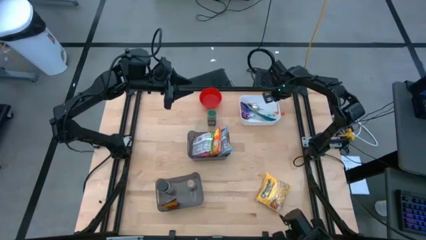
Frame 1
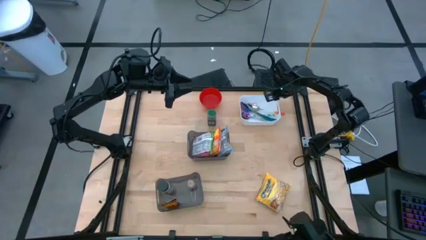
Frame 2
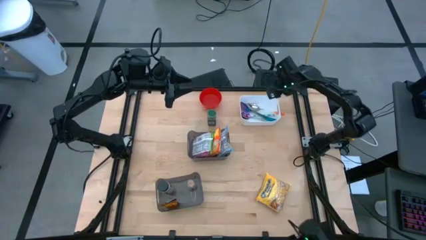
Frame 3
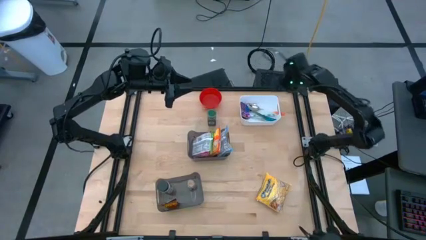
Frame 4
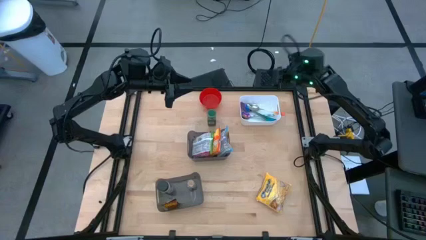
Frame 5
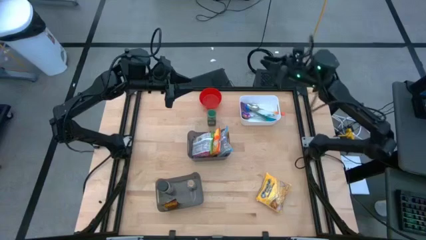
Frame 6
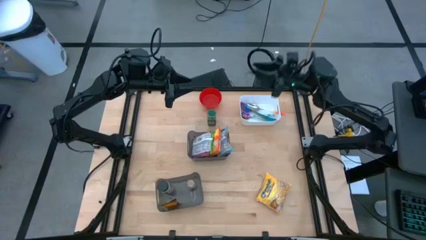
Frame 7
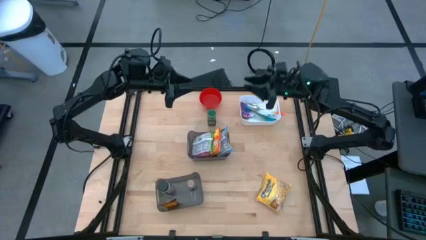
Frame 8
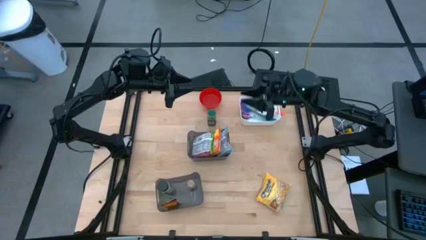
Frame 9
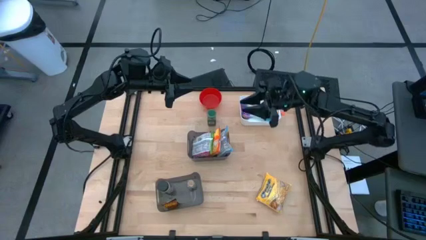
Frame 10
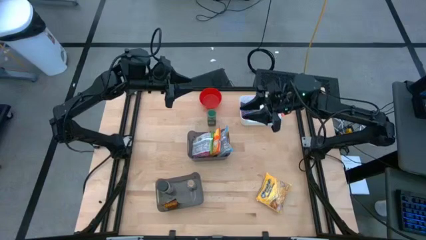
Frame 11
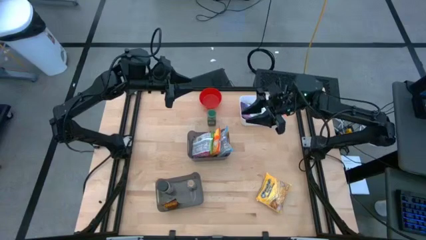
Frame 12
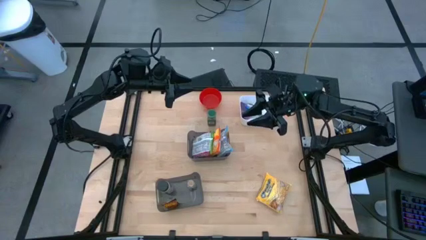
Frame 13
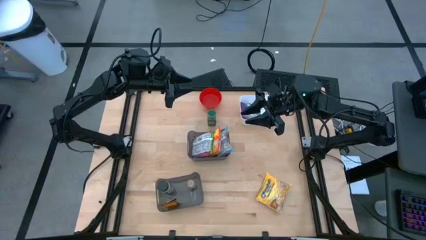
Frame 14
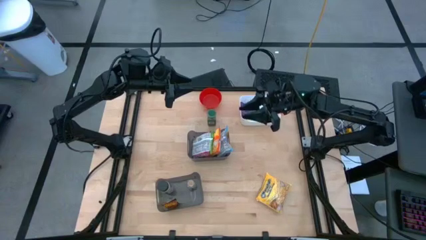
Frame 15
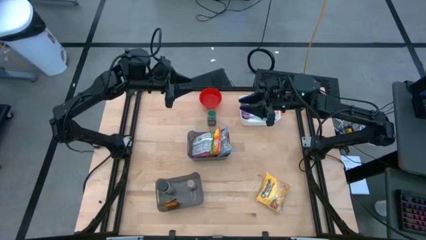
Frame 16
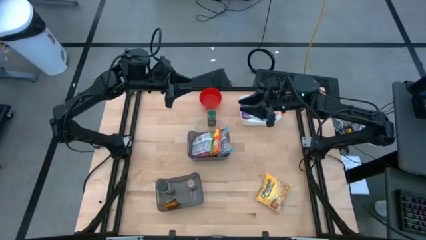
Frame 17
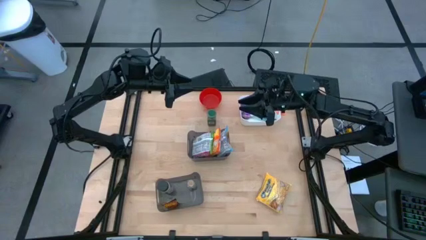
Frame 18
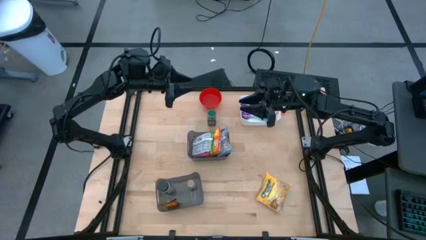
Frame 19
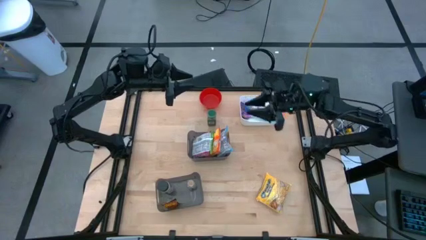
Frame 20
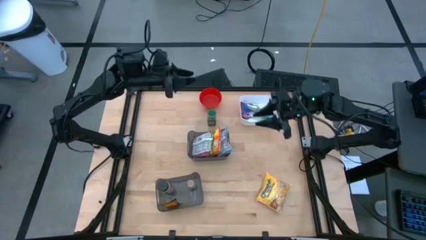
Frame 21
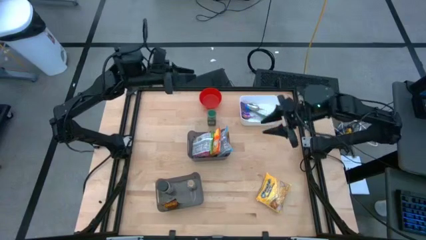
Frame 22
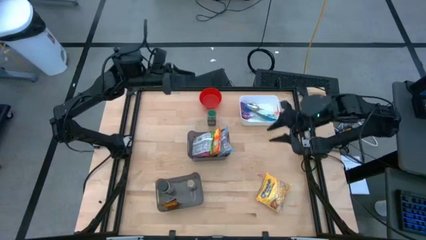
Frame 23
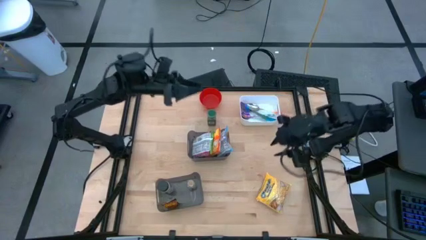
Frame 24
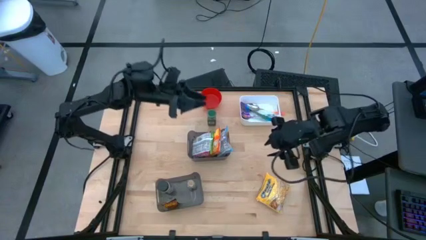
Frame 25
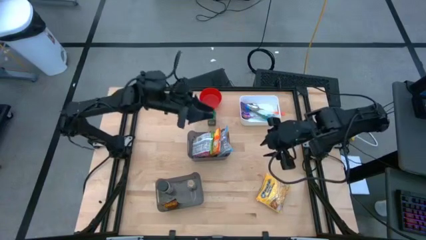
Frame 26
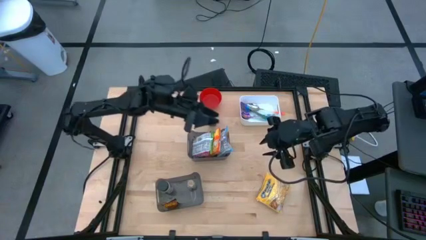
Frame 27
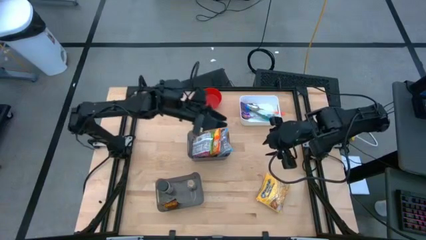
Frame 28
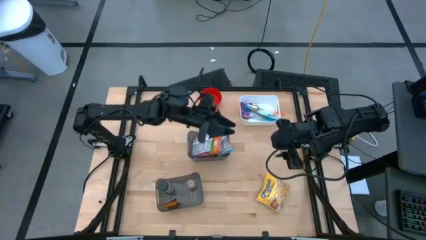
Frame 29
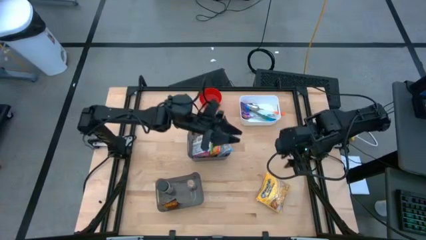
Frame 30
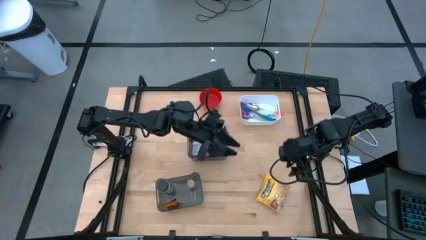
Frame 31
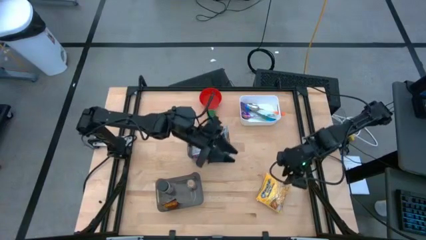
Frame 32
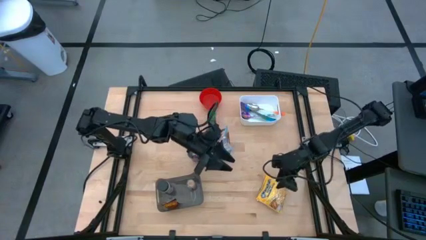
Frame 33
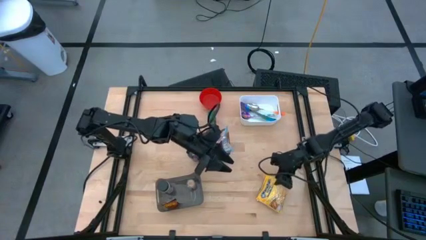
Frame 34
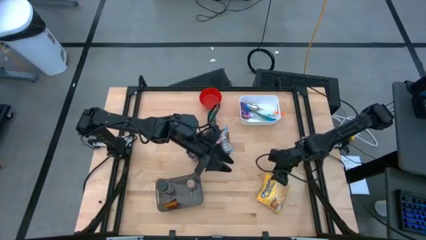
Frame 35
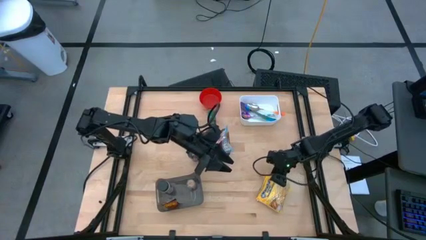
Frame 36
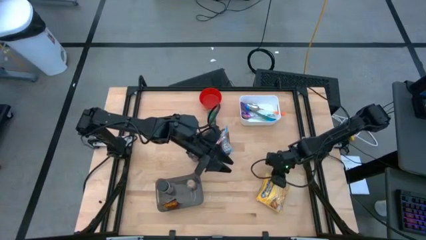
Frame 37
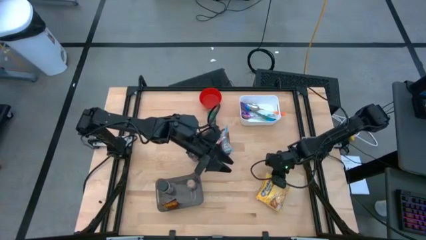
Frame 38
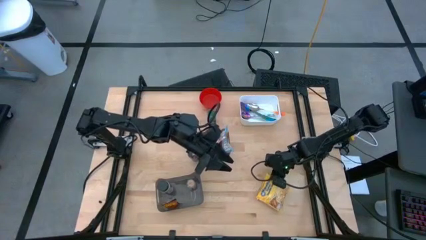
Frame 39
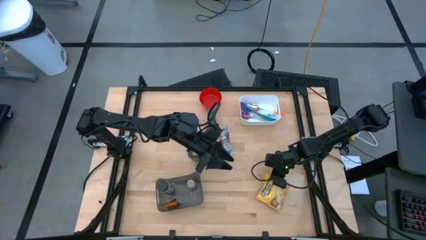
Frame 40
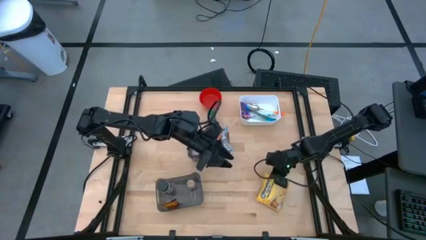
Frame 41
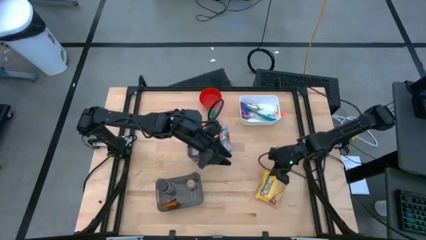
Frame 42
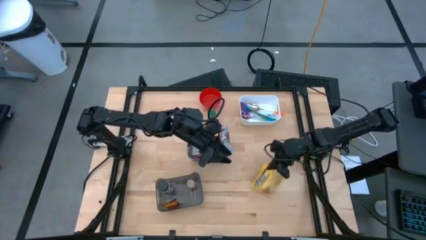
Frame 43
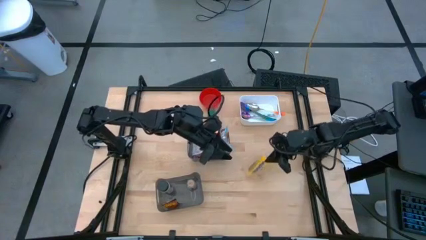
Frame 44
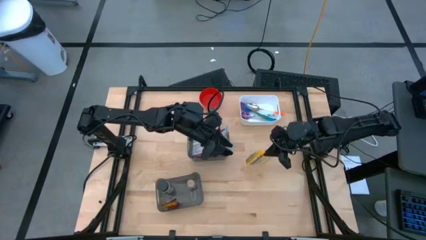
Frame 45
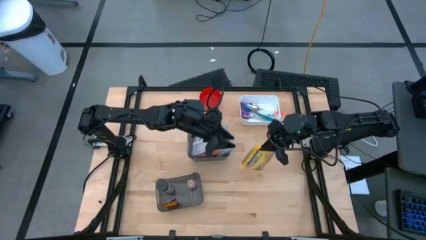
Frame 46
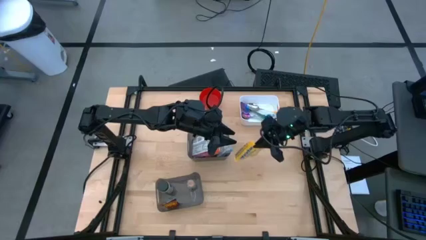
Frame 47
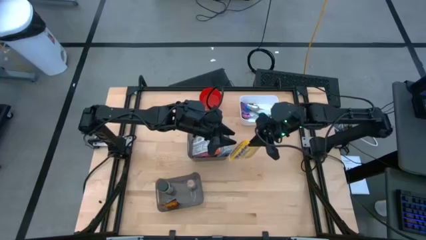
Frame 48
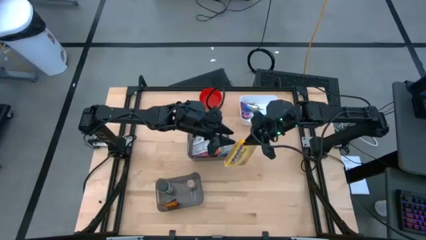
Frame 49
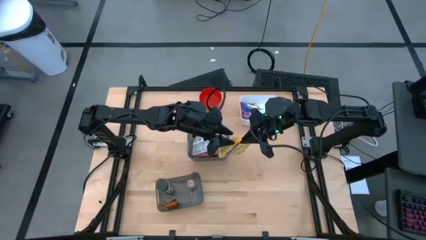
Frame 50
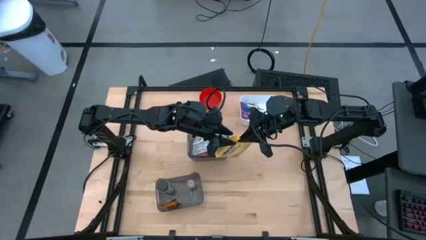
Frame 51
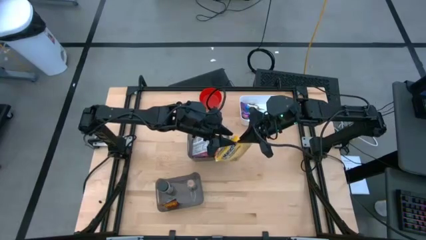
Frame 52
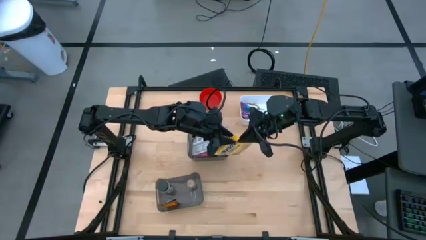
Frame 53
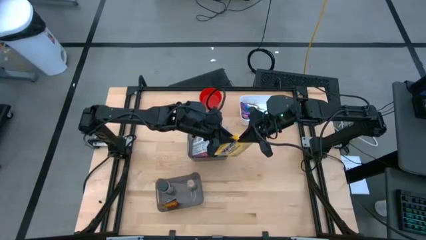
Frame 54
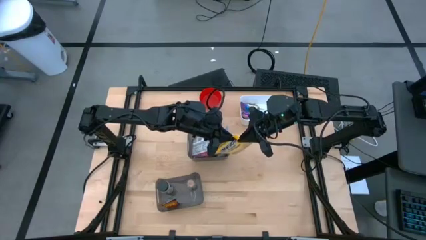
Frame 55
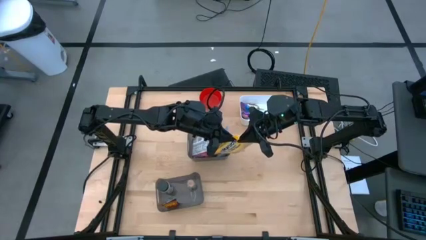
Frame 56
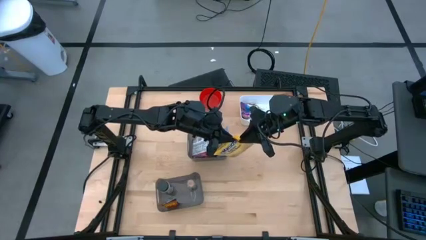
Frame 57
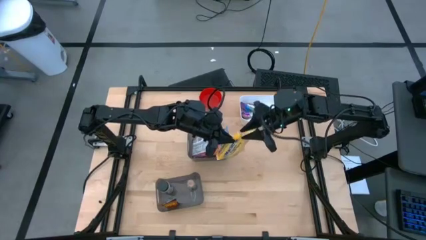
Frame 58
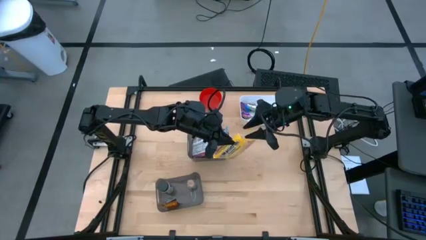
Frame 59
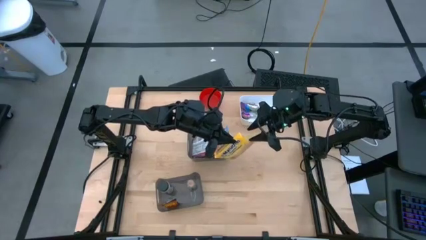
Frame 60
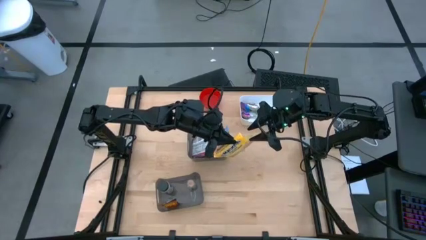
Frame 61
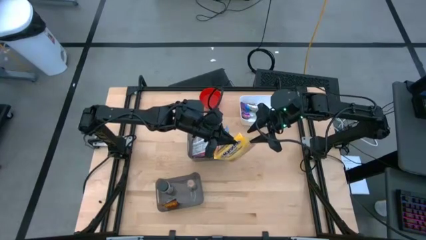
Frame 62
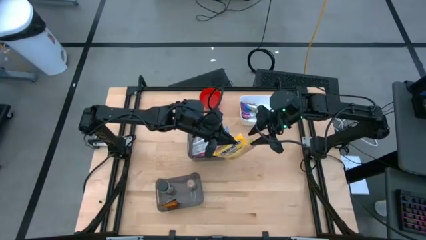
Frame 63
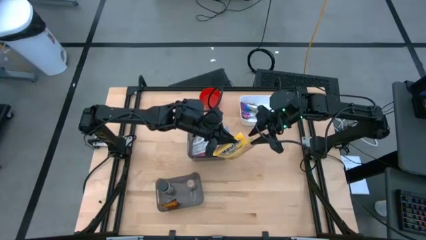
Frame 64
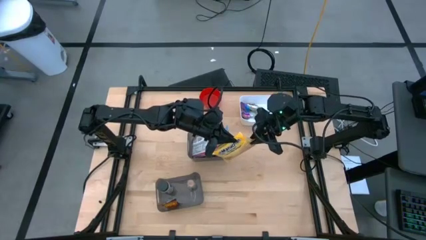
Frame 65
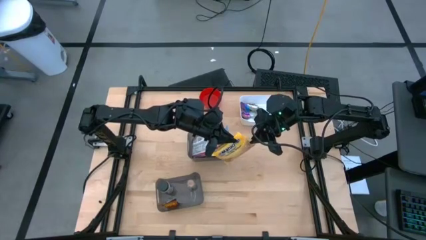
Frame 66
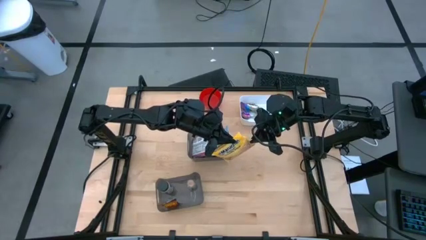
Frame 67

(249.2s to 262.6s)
Task: Pick & Place Food Item
Put the yellow noodle pack into the top black bin

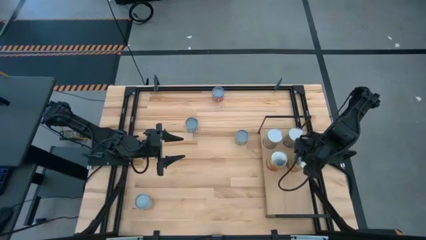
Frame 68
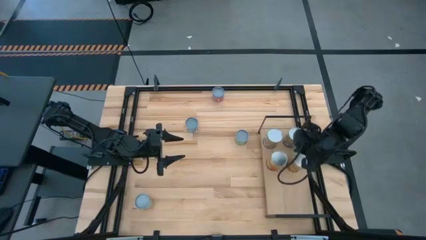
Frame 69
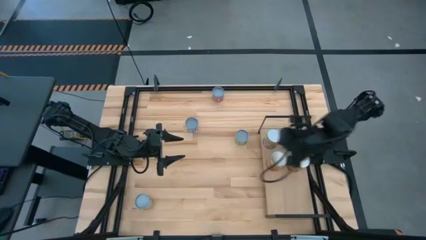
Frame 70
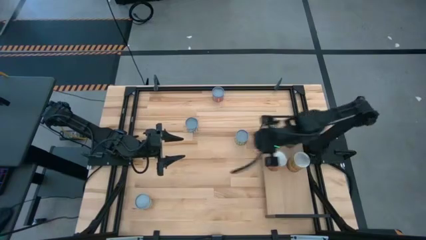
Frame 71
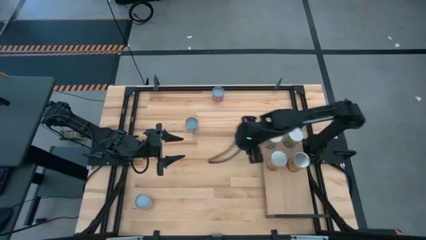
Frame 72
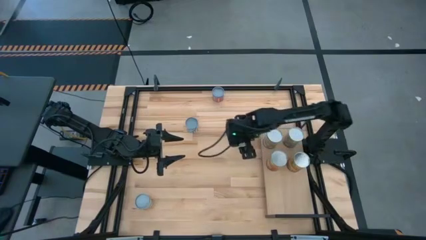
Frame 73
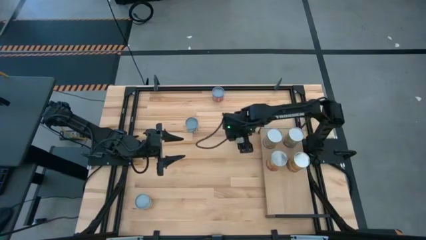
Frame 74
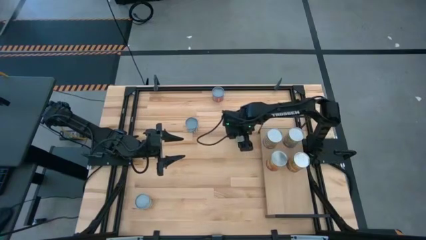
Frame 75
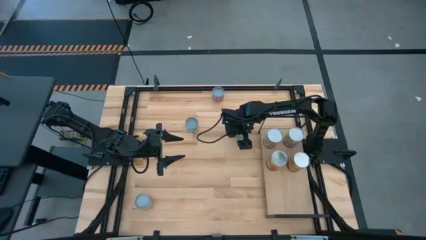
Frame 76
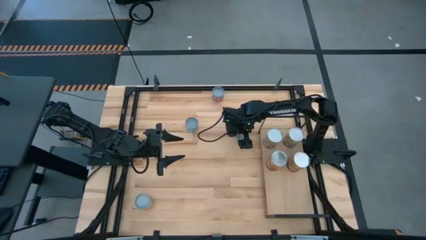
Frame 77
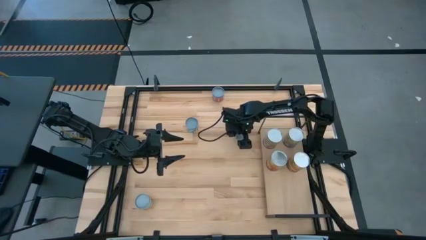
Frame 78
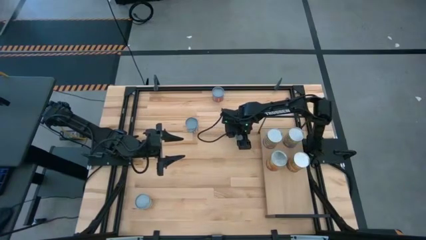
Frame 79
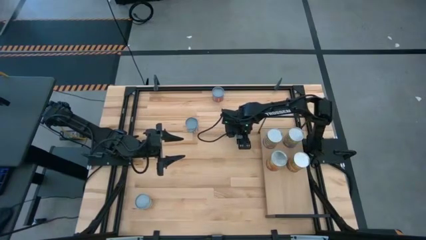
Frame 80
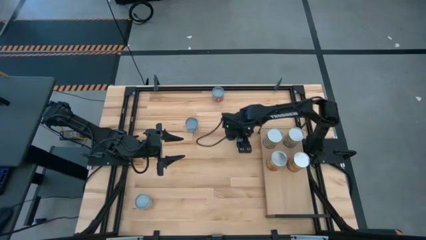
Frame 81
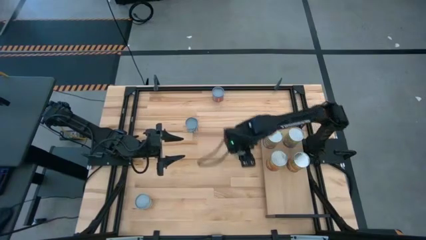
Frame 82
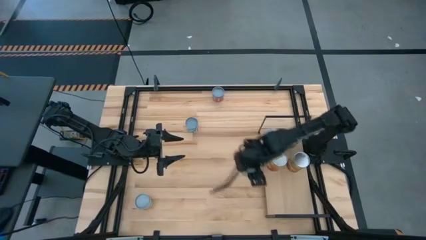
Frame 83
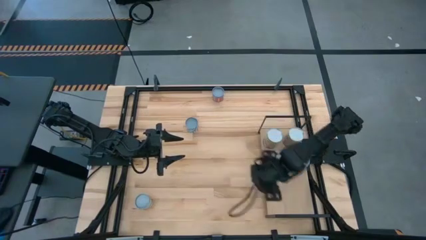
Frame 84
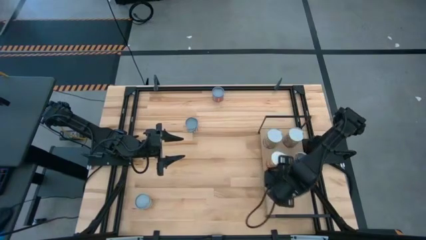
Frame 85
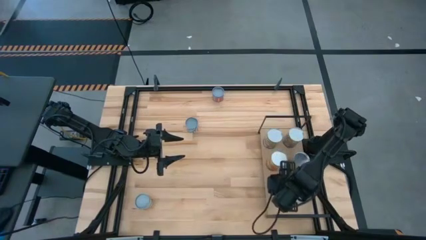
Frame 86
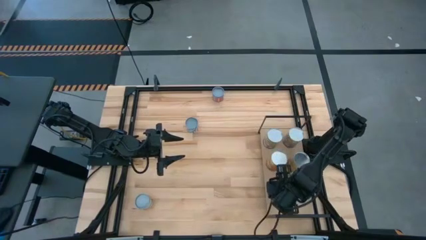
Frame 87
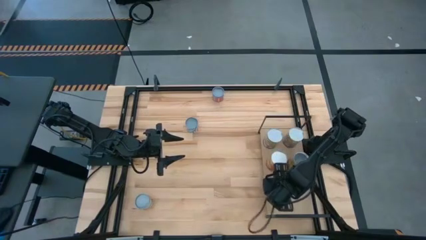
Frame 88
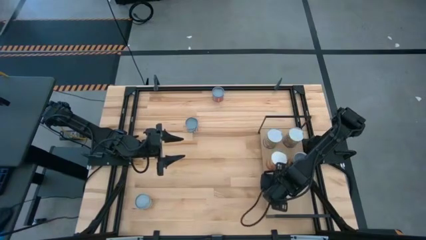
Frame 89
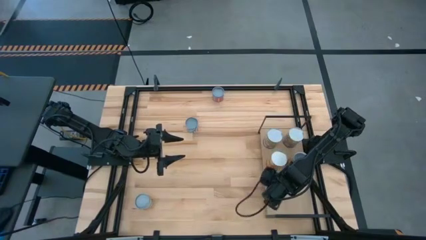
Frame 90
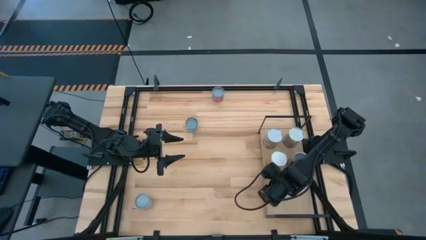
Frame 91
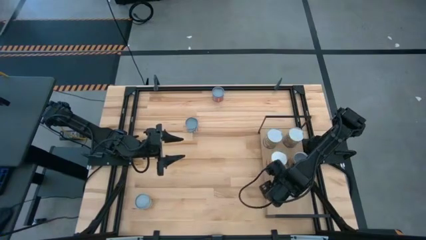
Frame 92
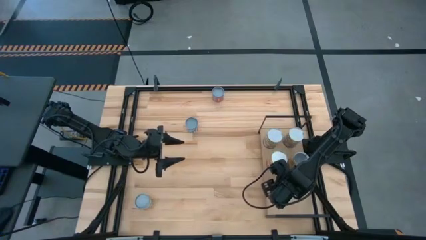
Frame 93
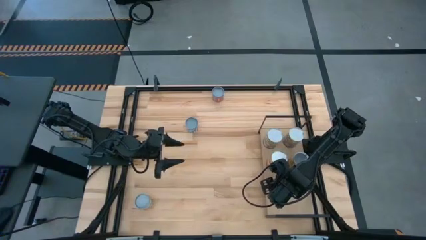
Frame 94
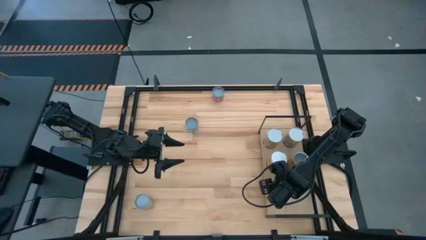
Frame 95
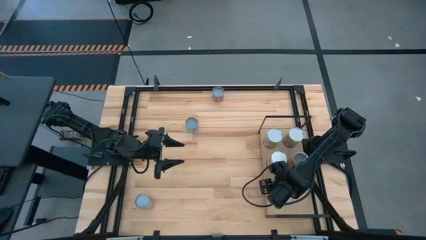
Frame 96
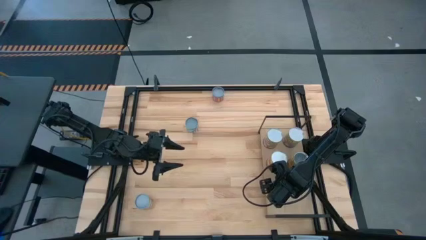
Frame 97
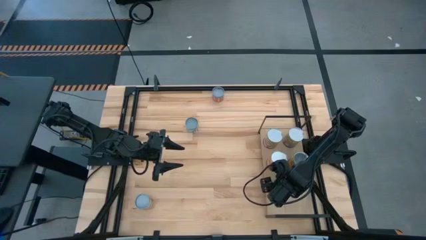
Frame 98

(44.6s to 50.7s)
Task: Pick and place cans onto a shelf
Put the canned mix on the shelf
